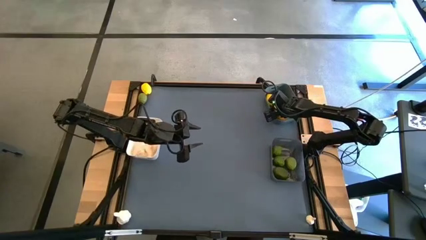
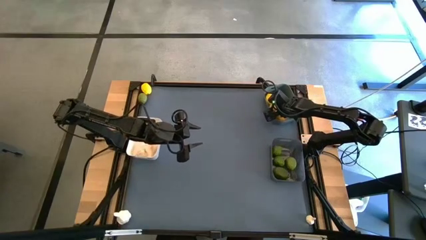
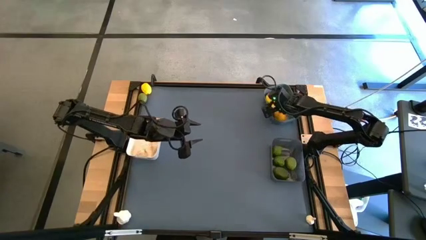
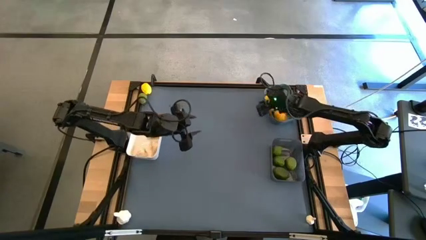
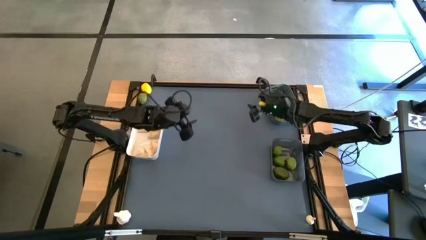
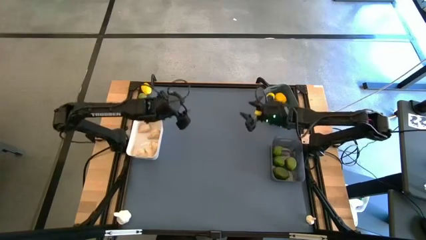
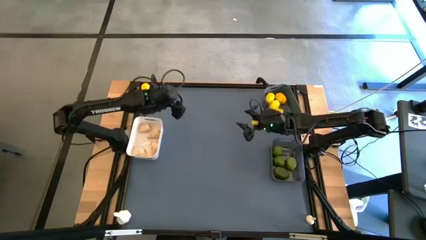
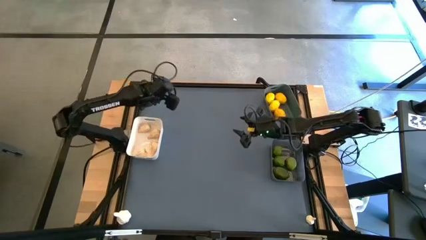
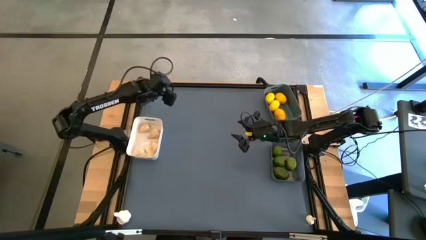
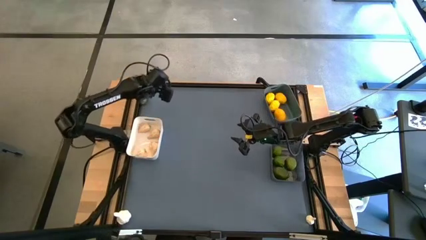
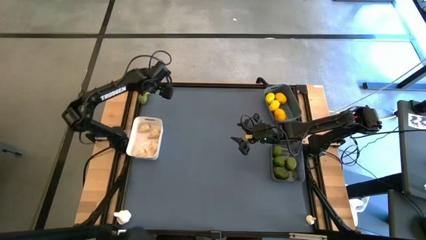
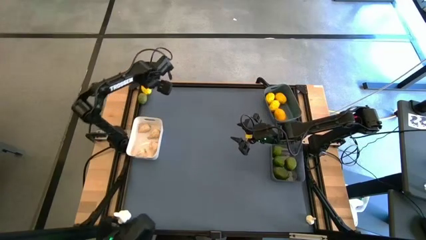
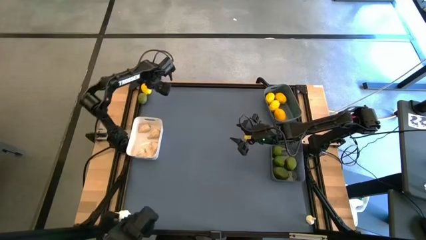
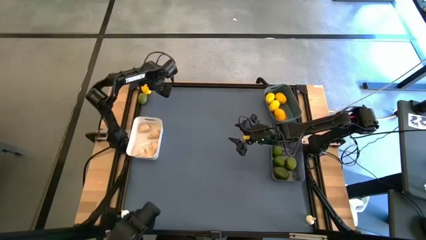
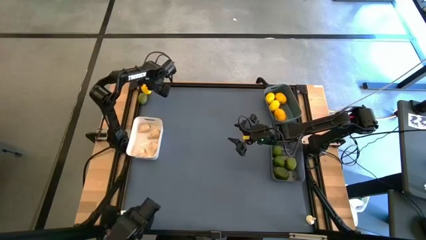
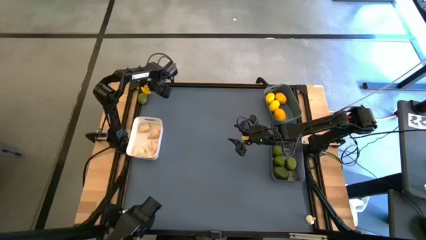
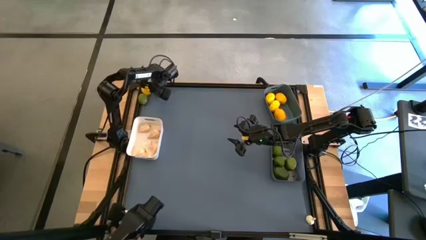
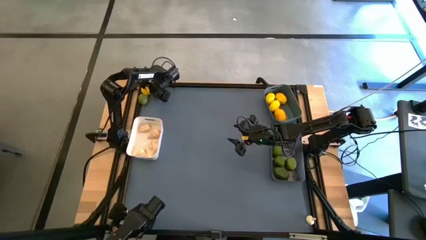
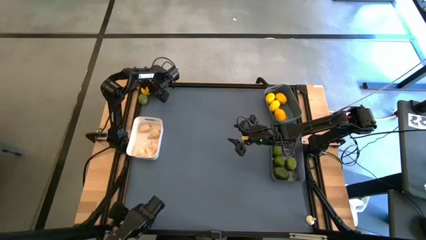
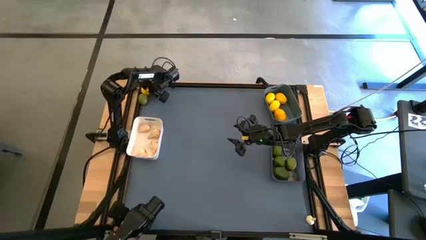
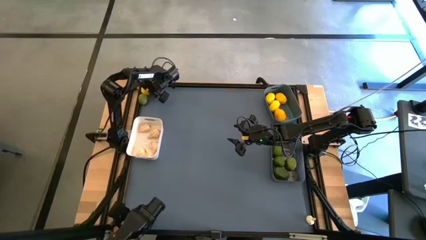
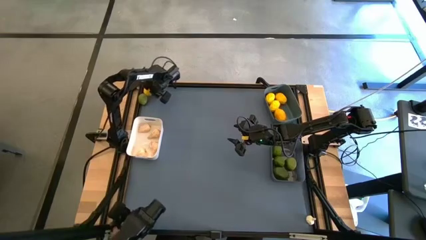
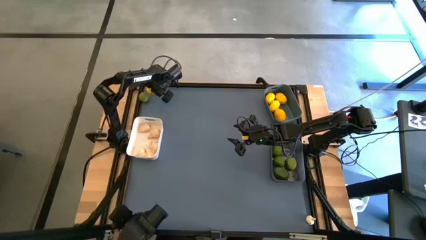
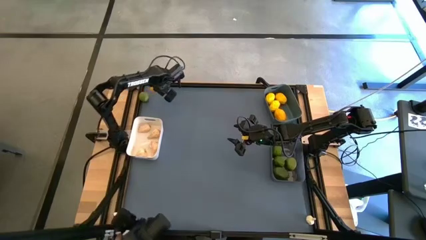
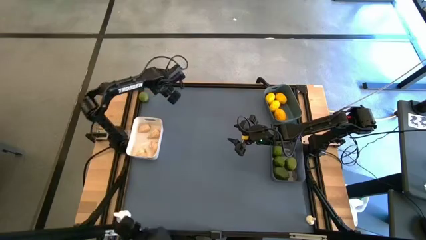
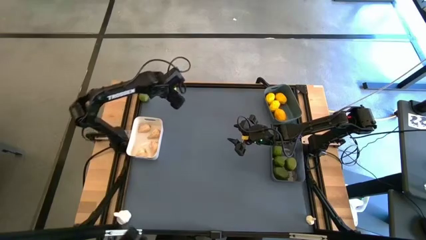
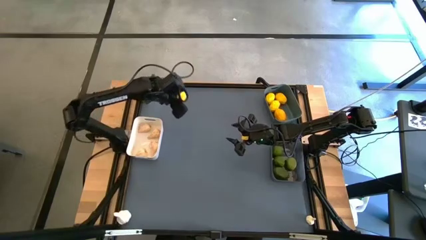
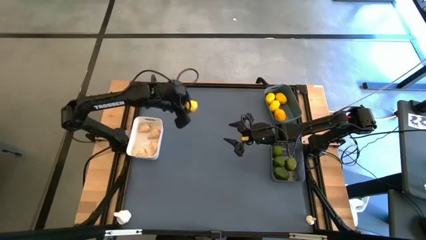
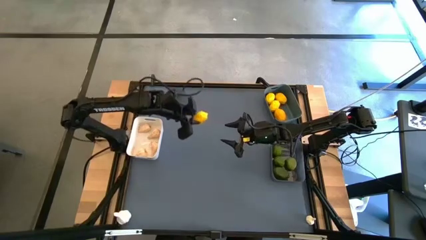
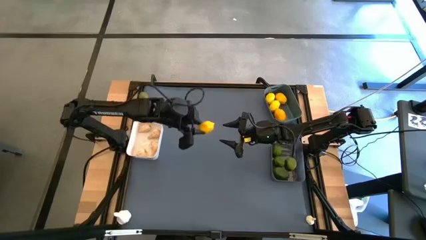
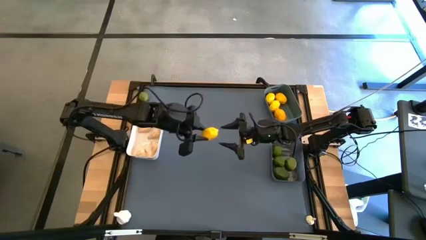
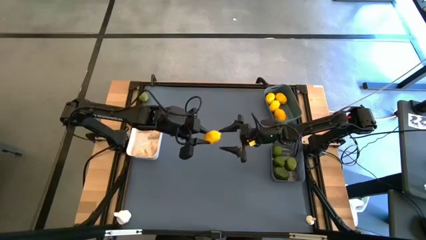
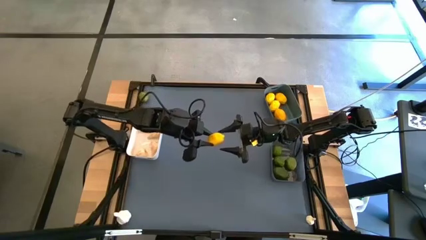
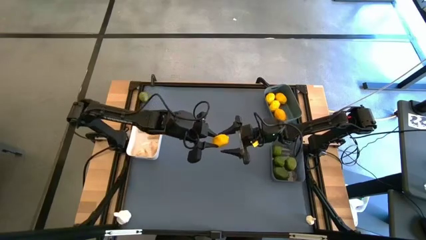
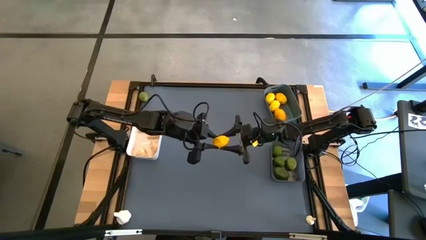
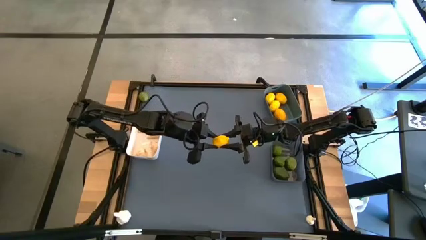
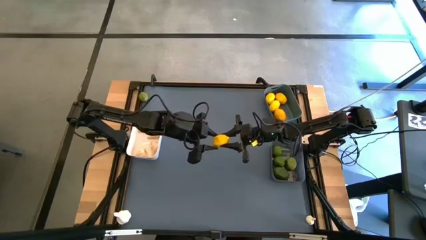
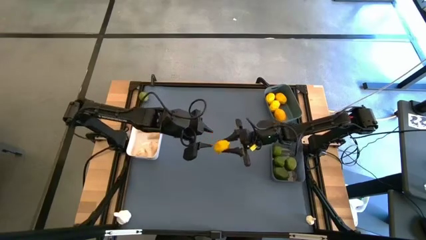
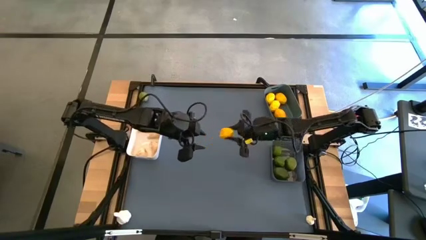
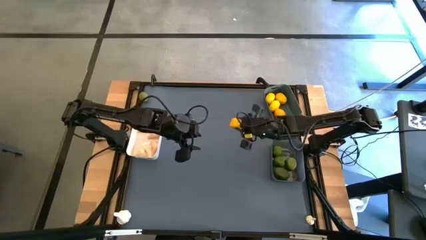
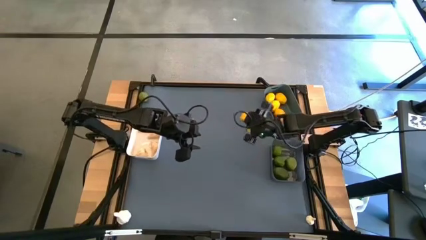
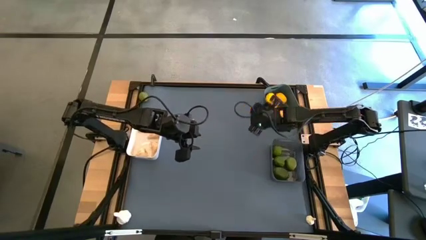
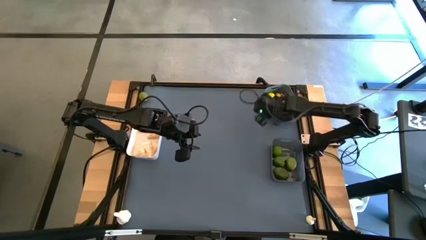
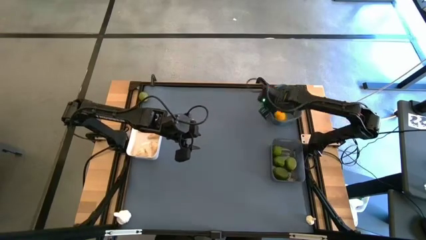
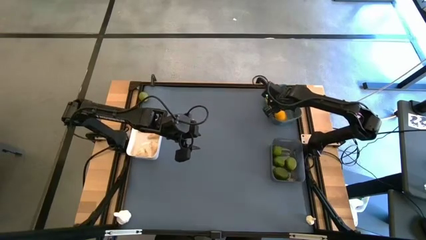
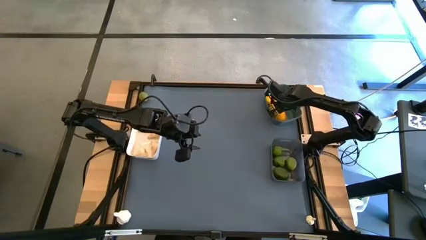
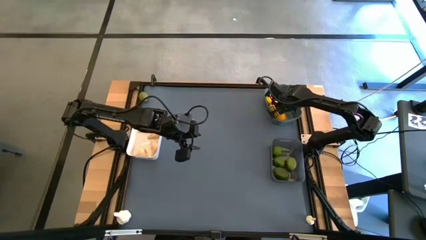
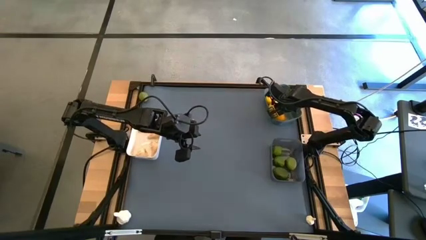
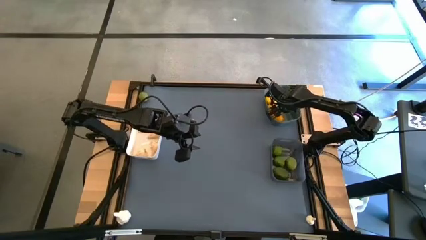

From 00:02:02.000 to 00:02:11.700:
Task: Sort produce into baskets
Put the lemon into the blue bin

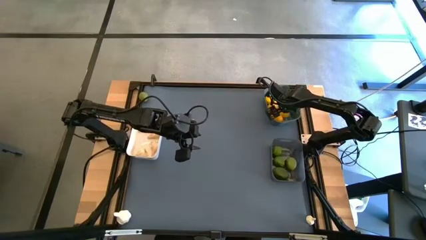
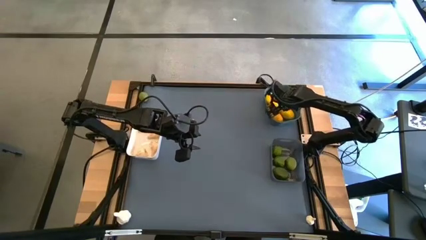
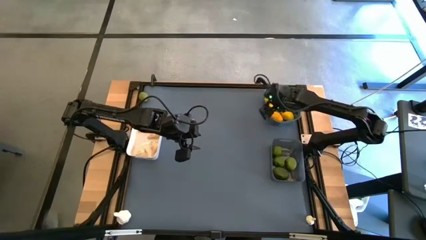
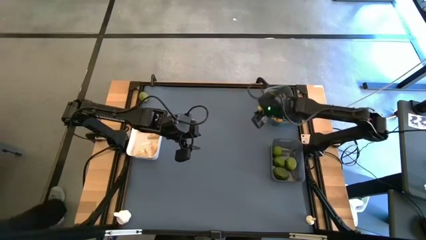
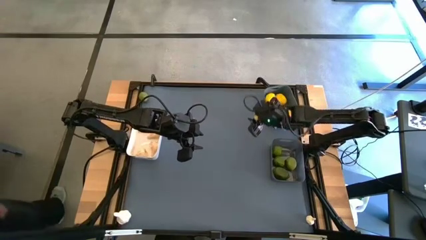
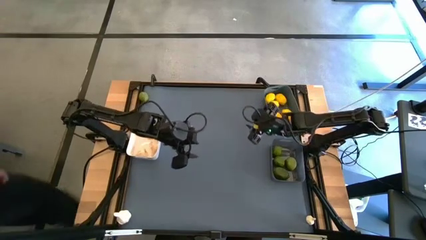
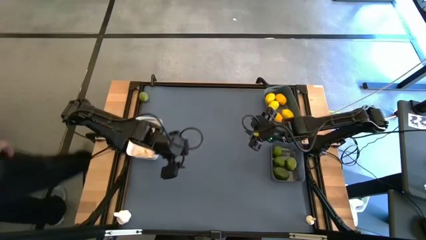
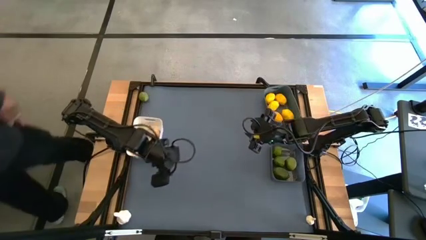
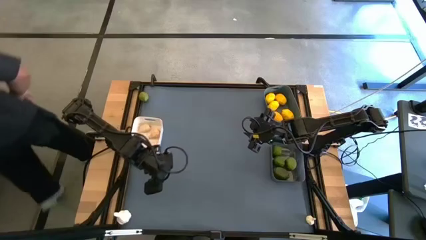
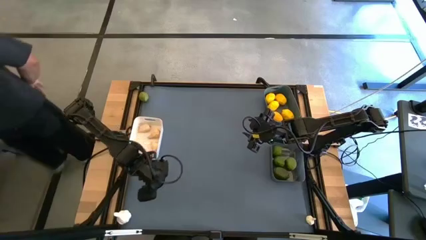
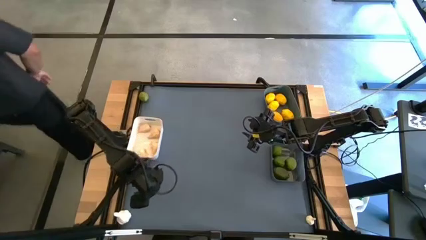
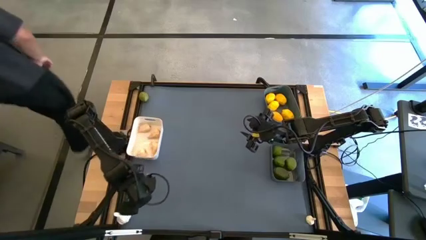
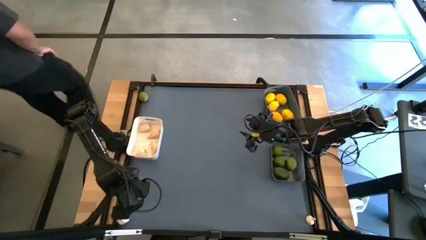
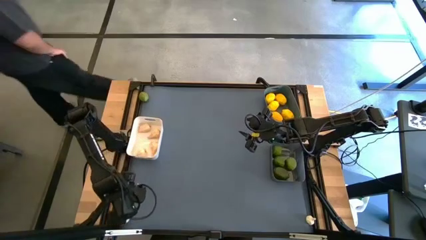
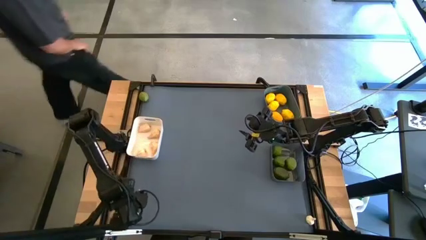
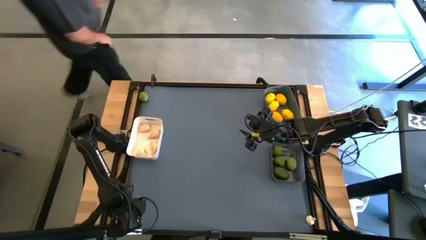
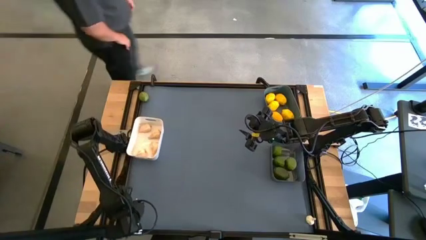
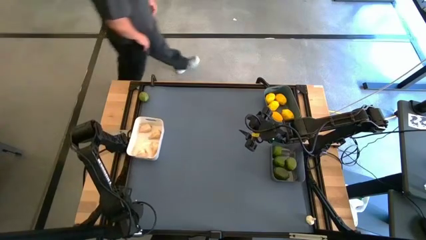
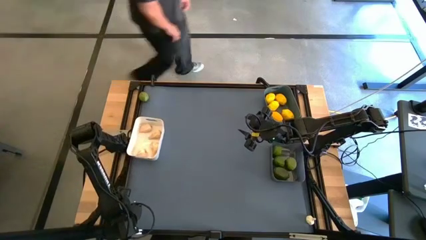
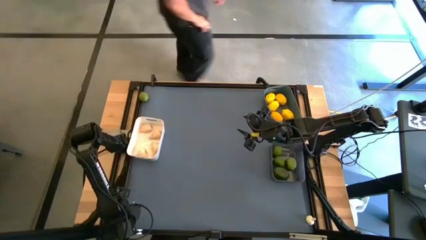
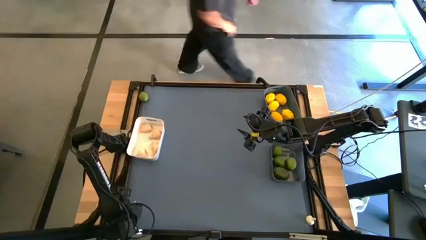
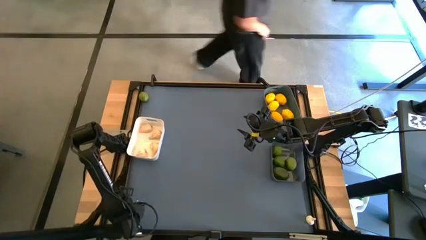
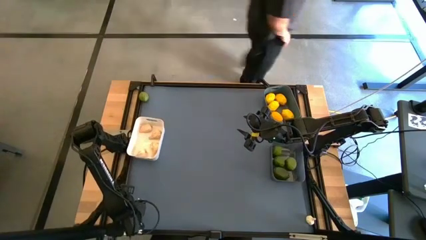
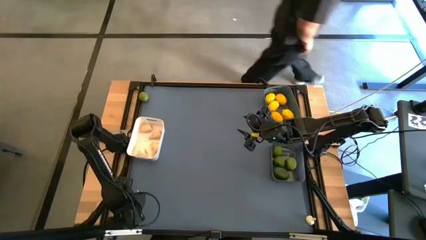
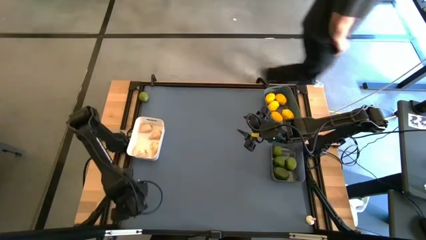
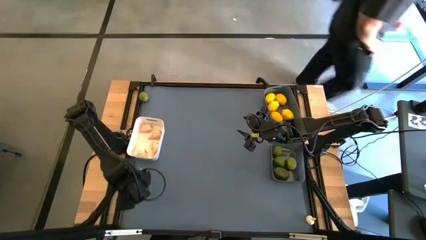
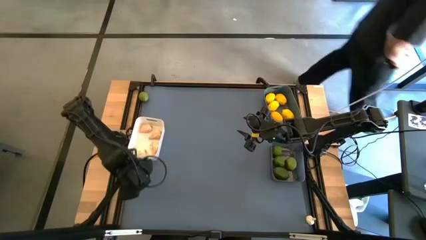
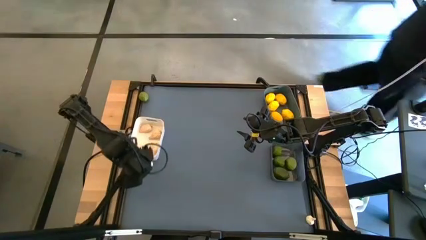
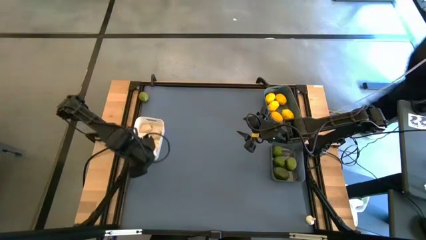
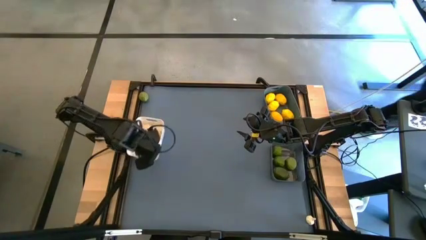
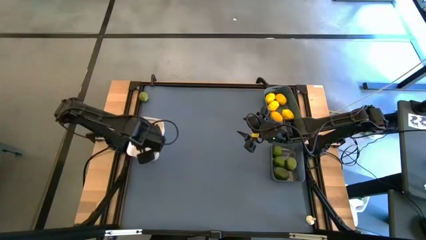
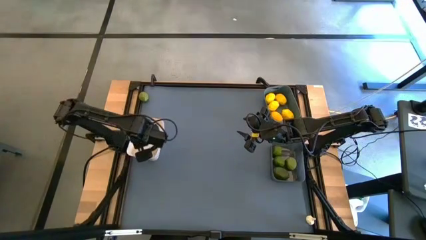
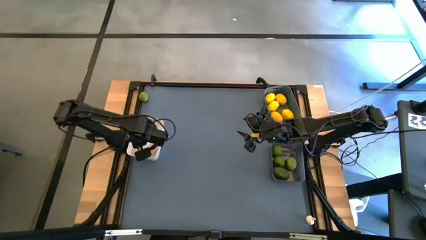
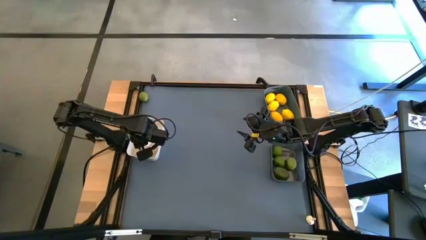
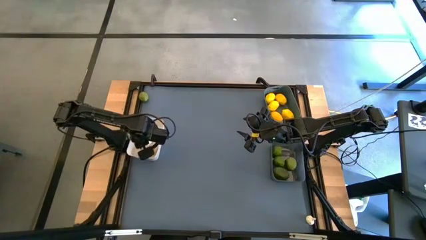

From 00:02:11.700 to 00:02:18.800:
Put the garlic into the white bin
